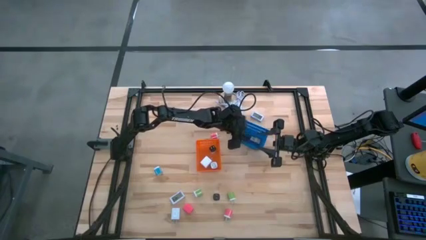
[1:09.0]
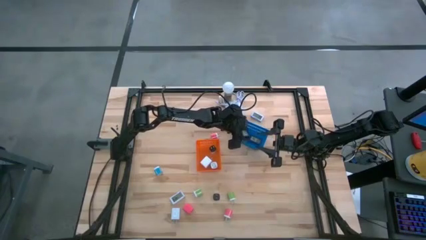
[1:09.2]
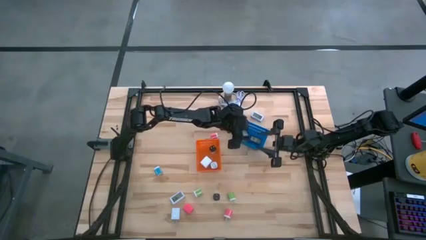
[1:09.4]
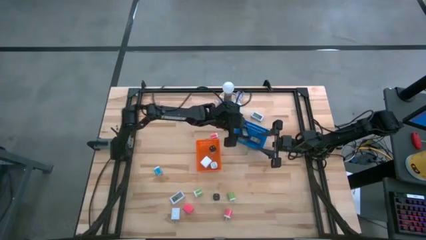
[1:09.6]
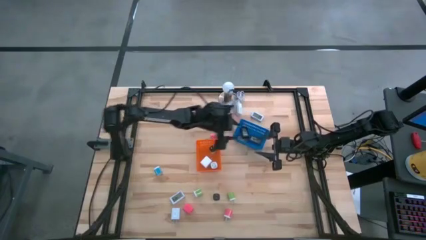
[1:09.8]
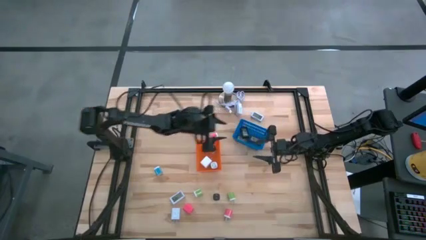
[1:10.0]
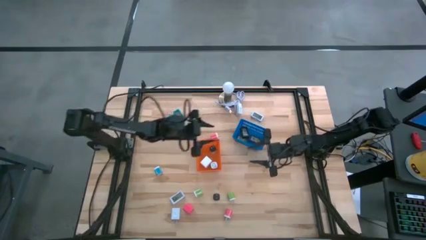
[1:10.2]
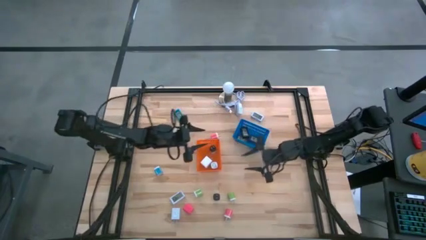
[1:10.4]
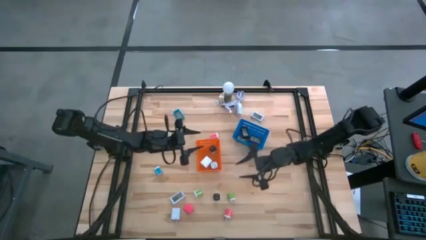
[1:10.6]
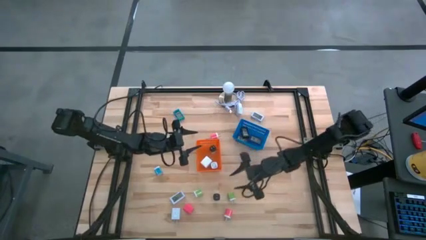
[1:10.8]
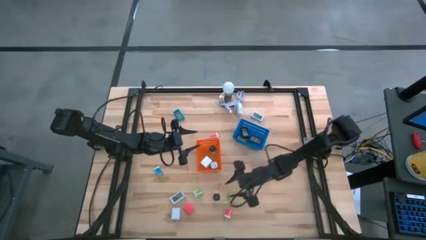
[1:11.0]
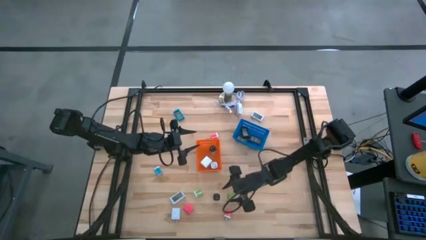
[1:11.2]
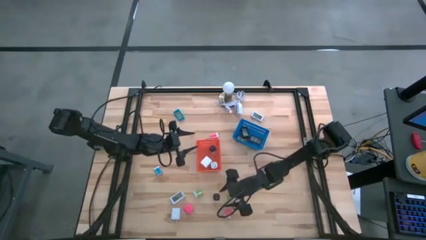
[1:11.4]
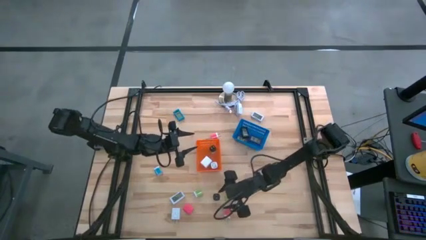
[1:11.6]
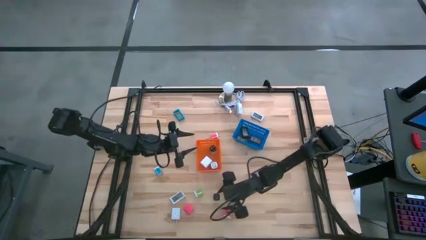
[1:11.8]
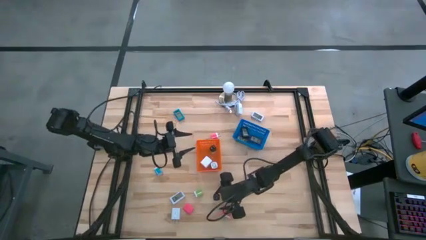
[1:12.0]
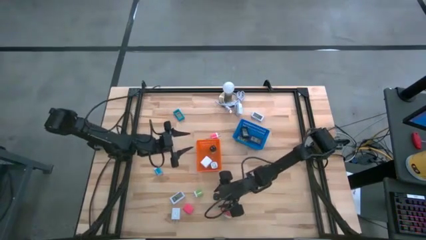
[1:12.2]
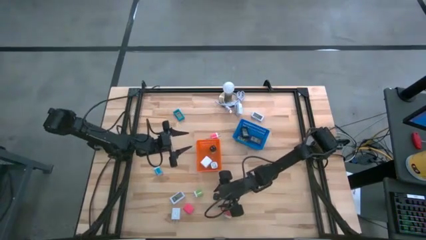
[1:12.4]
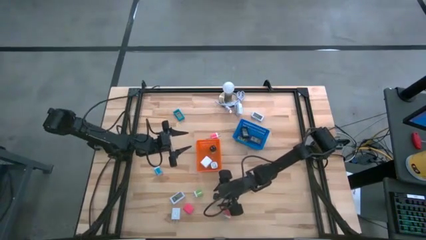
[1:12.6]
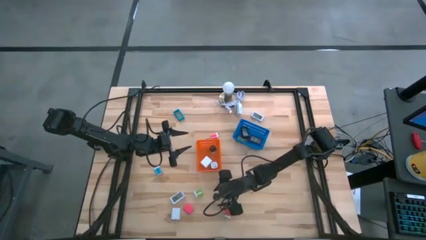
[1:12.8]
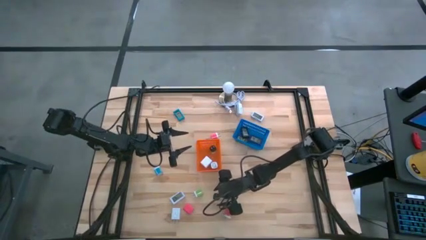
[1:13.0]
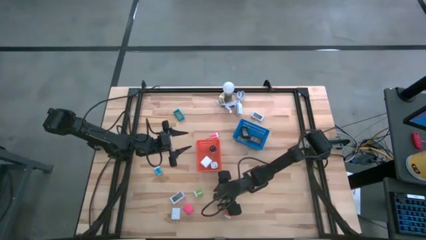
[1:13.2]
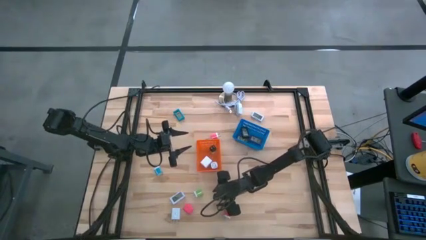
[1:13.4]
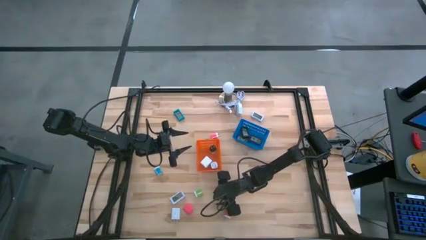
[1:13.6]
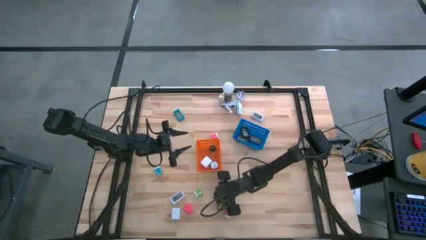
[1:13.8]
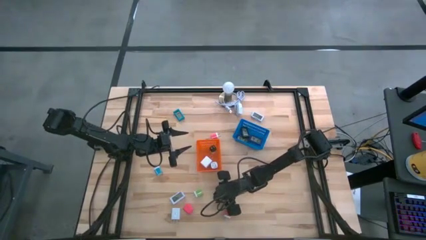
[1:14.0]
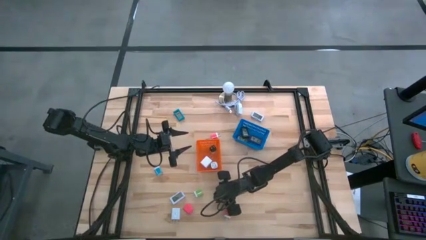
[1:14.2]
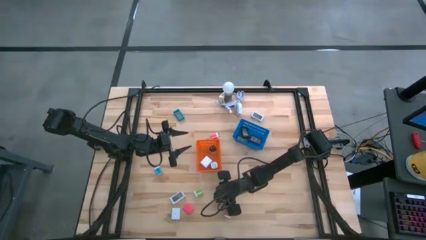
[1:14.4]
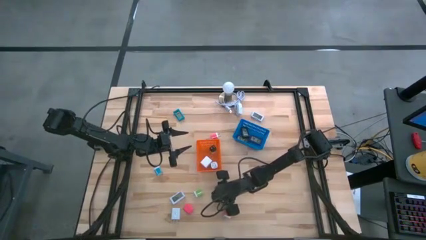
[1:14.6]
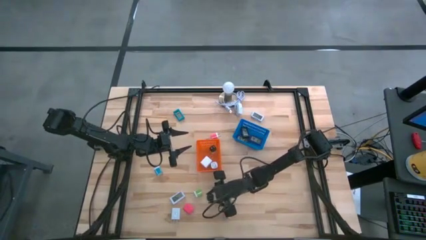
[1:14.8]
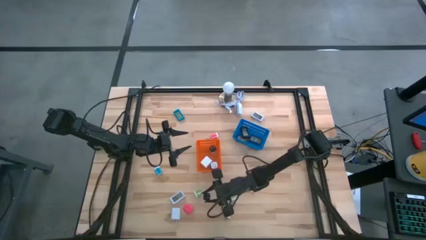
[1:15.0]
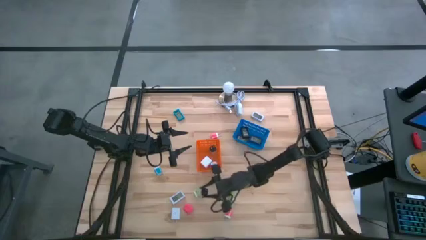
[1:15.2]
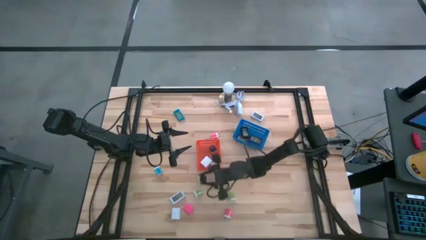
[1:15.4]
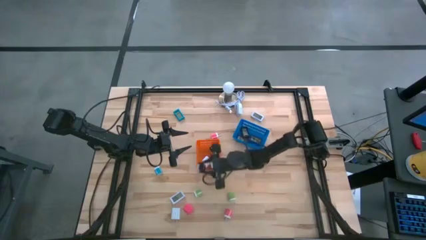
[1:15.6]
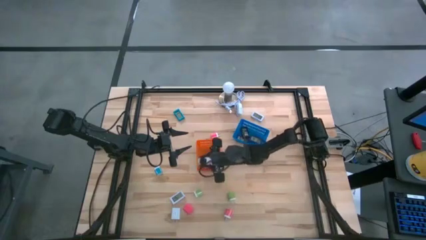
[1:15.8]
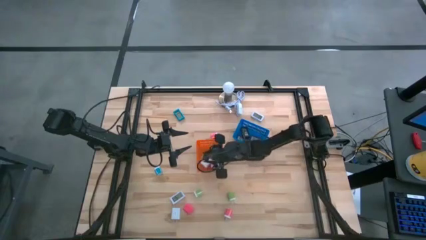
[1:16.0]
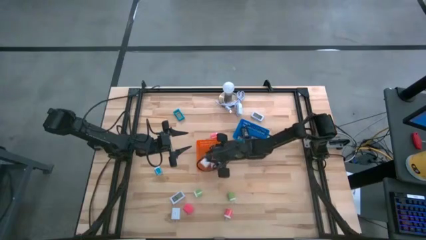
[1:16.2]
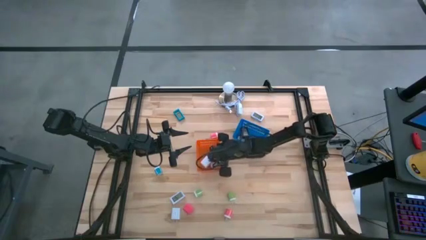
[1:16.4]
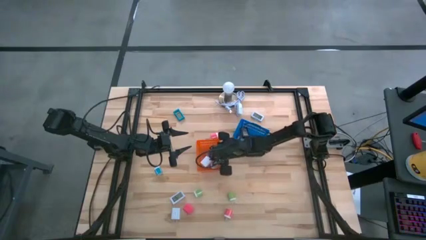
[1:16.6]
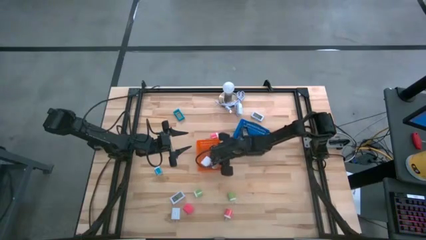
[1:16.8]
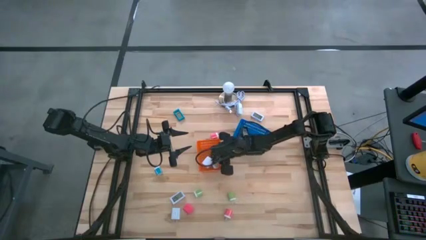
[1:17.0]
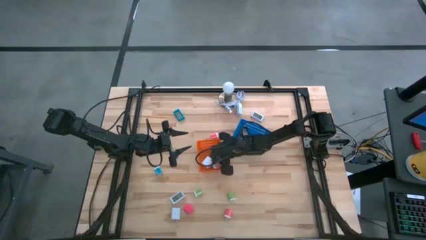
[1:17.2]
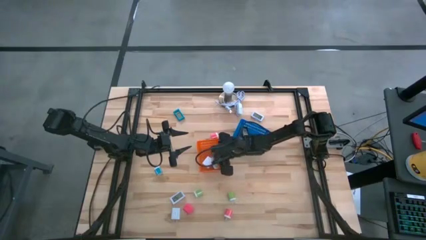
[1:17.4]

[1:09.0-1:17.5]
Task: Pick & Place Office items
Put the black charger adapter into the orange bin

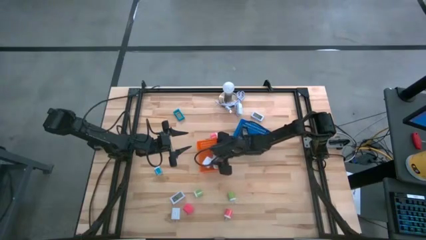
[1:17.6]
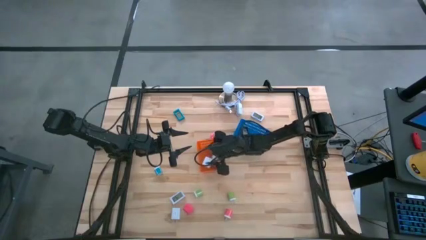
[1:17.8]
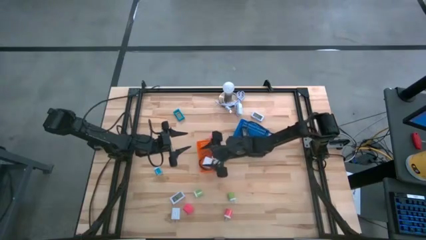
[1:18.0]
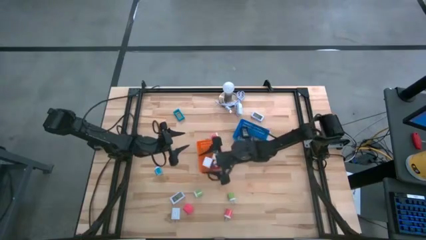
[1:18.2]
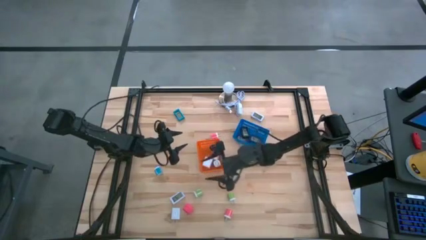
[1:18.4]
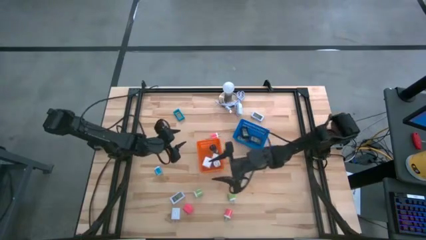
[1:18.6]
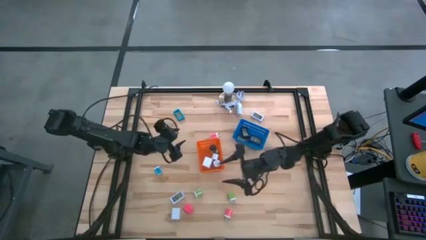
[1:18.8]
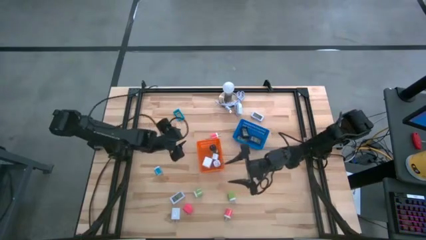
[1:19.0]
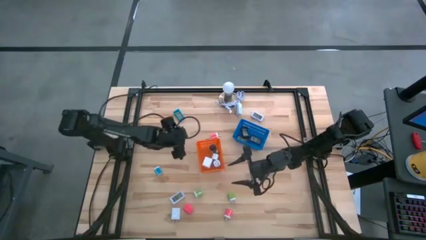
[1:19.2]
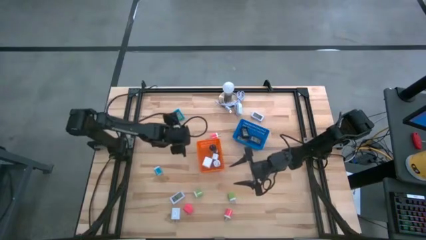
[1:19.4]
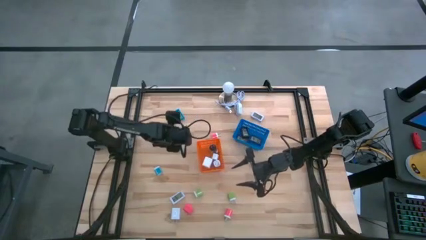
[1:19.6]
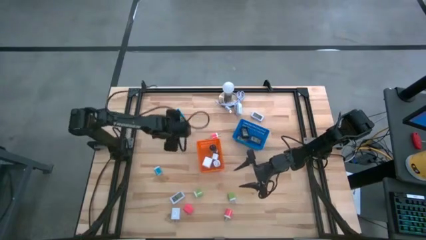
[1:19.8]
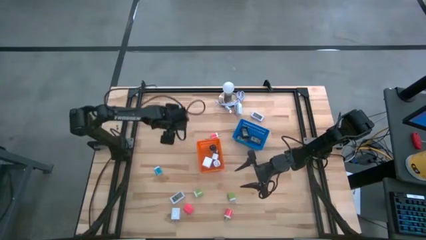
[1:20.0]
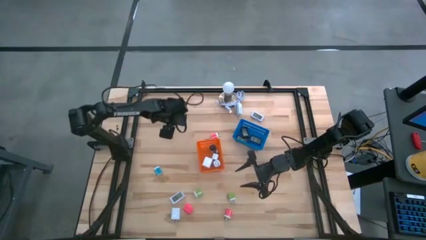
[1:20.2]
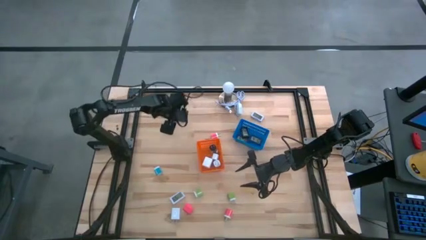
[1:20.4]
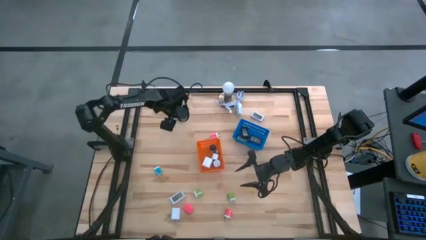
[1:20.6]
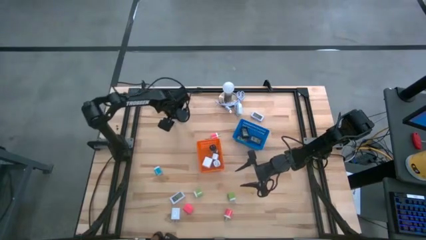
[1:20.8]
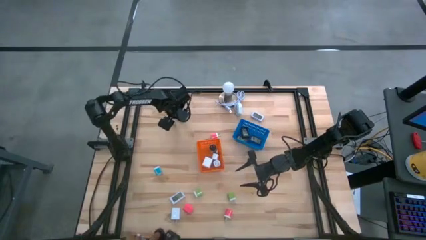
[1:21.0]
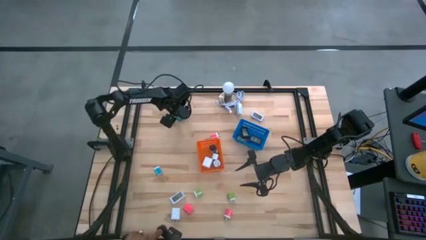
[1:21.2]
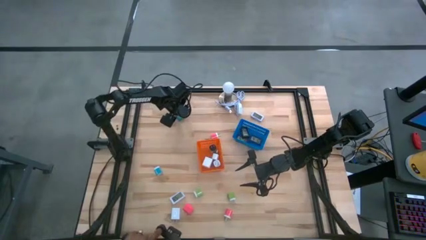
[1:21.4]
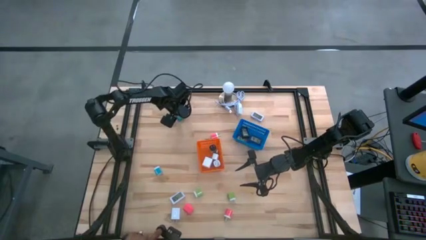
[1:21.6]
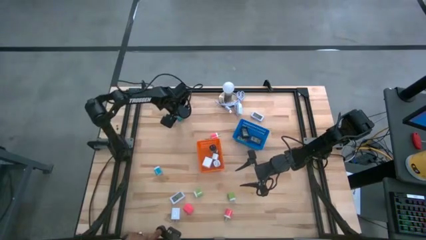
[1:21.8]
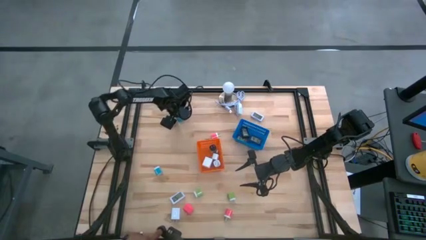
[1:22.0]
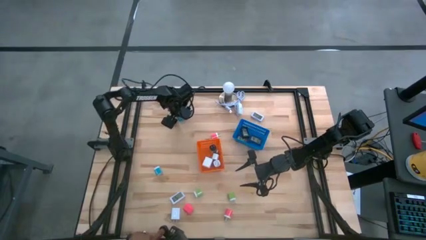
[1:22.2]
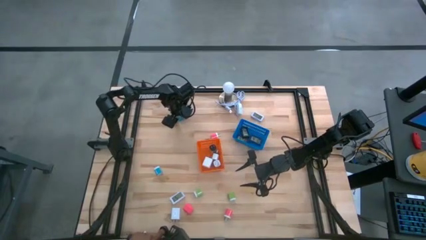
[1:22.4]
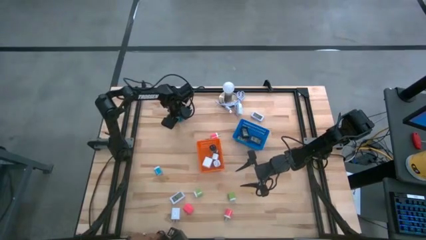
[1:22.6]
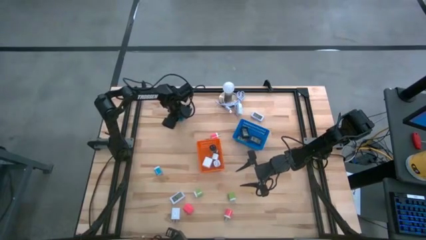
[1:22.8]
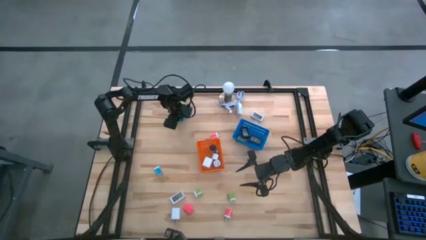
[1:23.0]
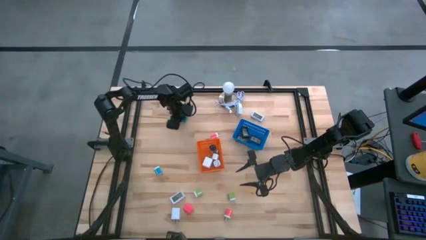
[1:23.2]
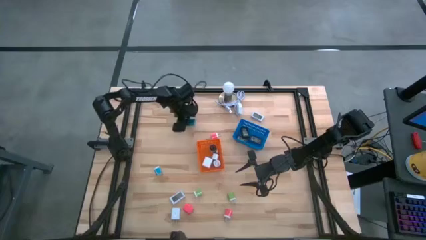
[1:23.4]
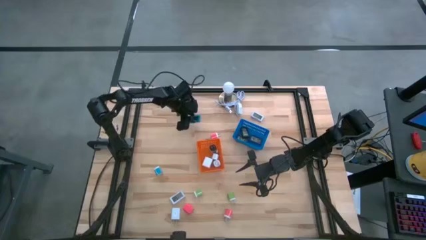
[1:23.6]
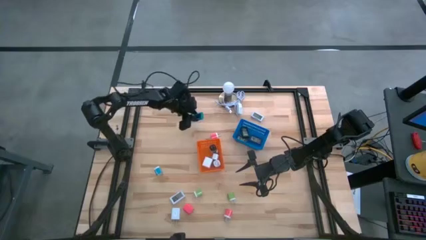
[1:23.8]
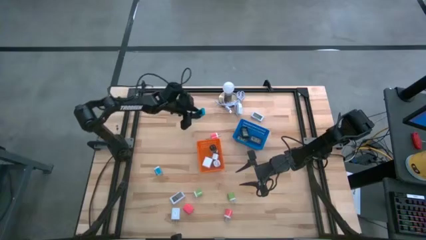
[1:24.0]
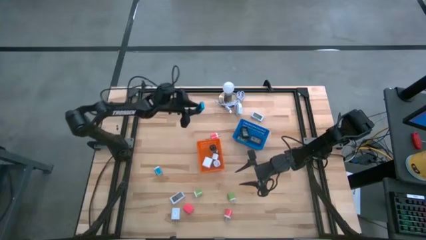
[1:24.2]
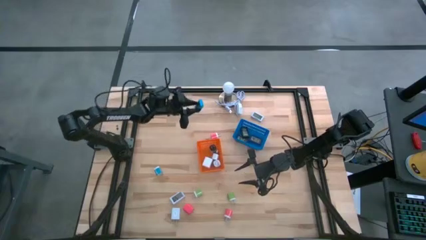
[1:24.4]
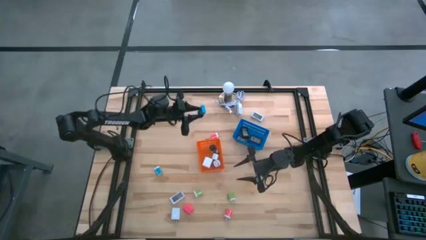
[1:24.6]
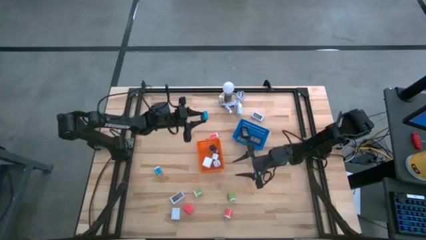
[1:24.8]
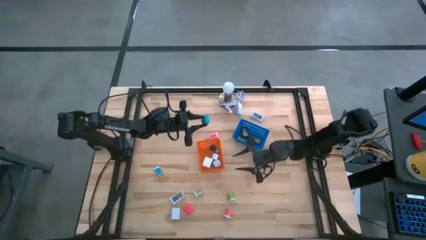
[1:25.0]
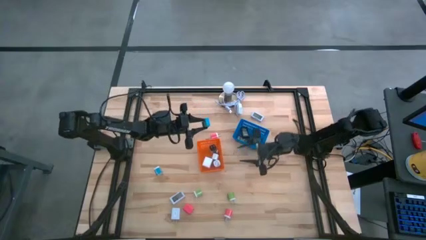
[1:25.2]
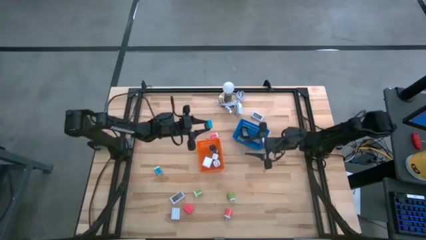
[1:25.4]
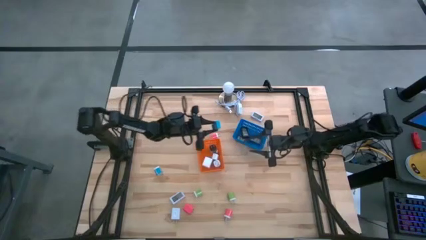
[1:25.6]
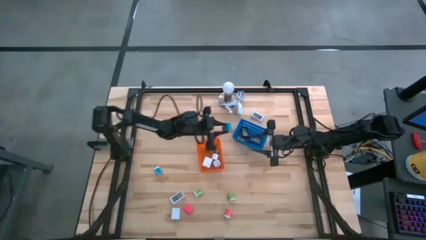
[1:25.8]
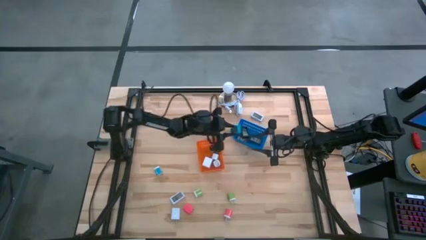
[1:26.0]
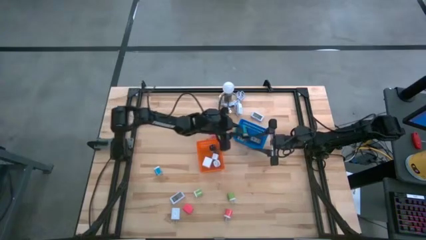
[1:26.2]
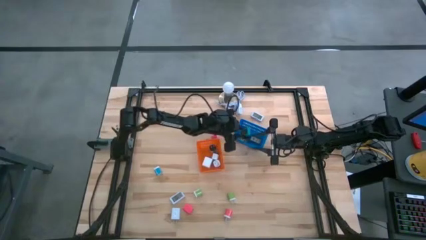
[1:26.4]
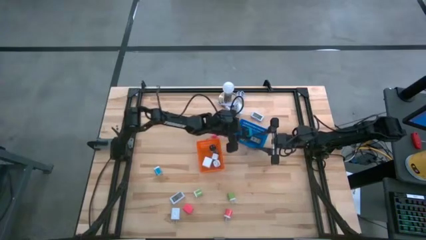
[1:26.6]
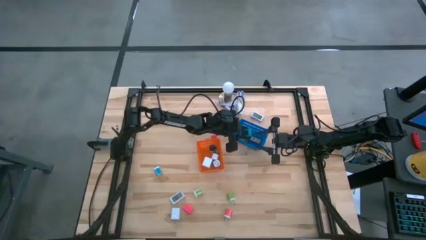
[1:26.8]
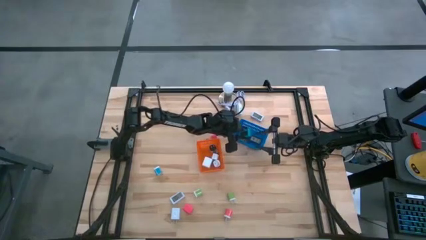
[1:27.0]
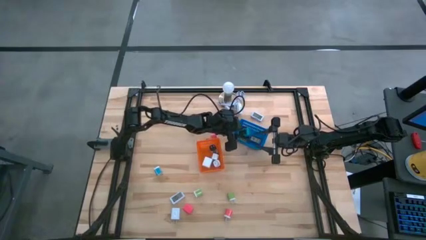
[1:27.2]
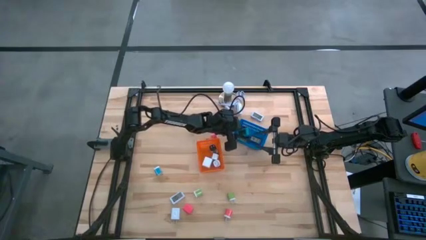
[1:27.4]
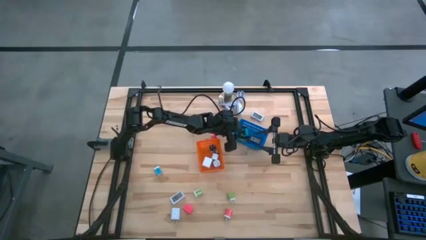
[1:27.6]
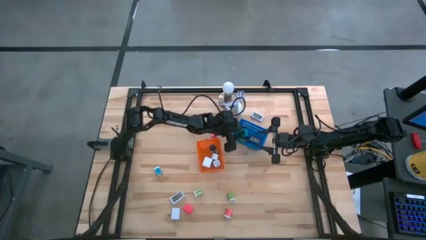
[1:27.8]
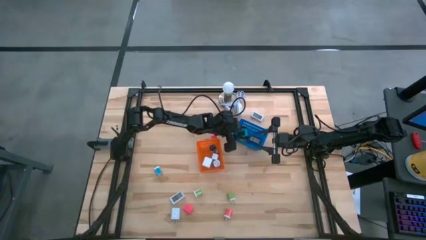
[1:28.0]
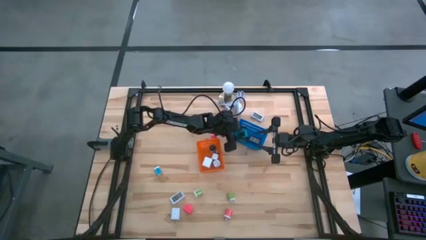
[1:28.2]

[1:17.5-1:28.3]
Put the sky blue digital timer into the blue bin
